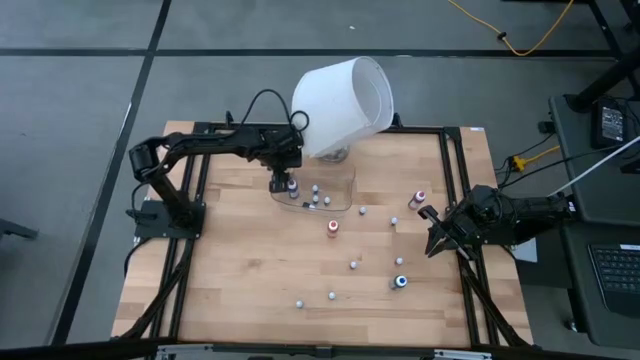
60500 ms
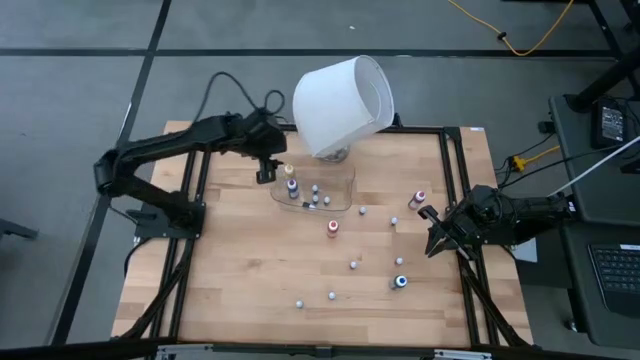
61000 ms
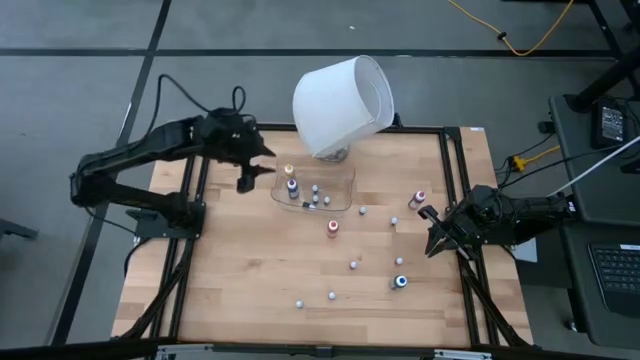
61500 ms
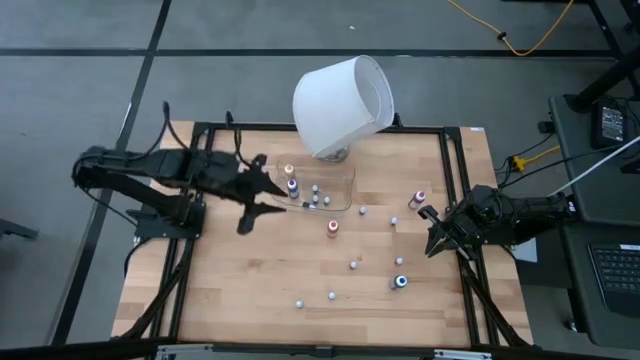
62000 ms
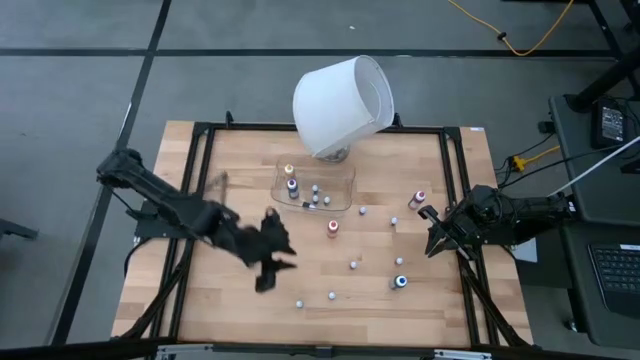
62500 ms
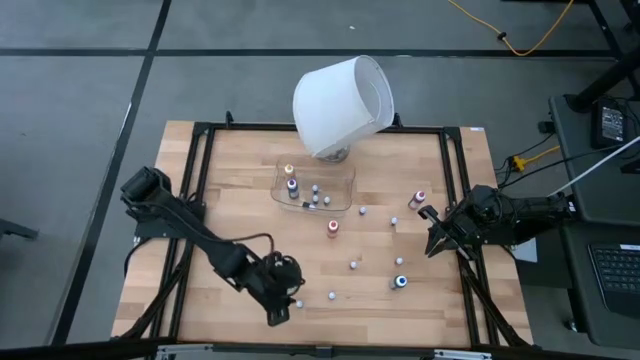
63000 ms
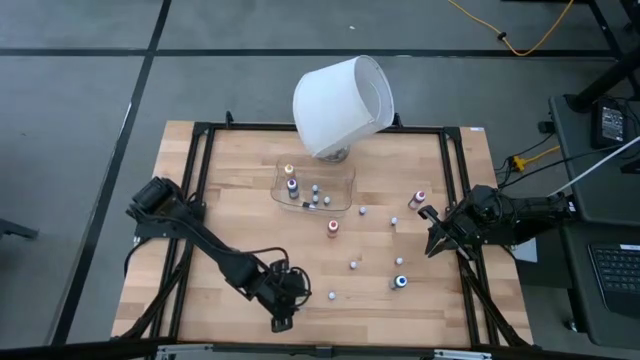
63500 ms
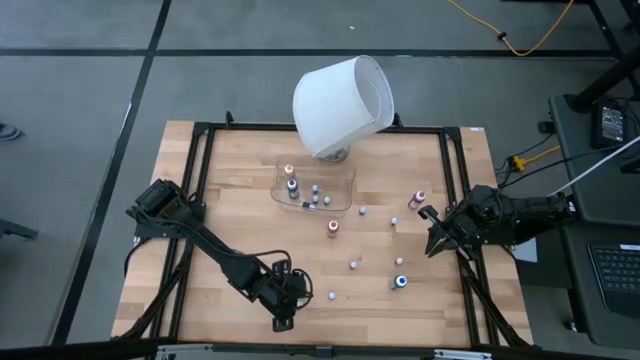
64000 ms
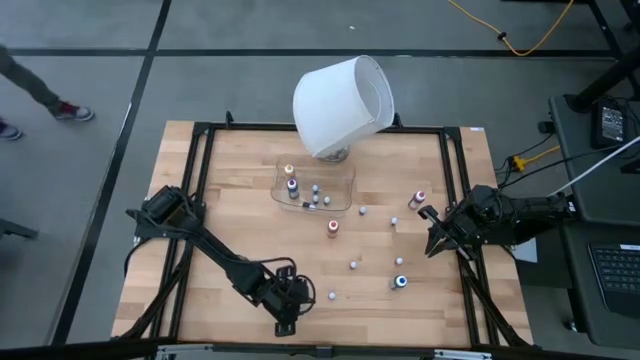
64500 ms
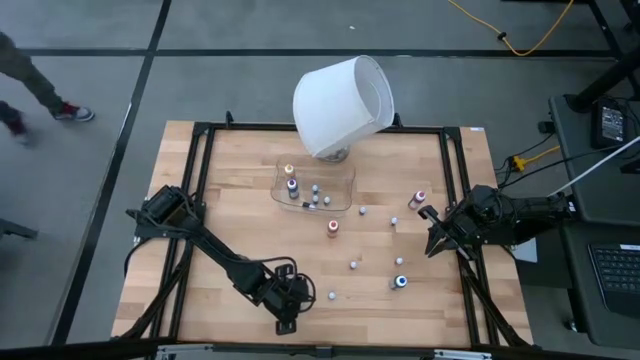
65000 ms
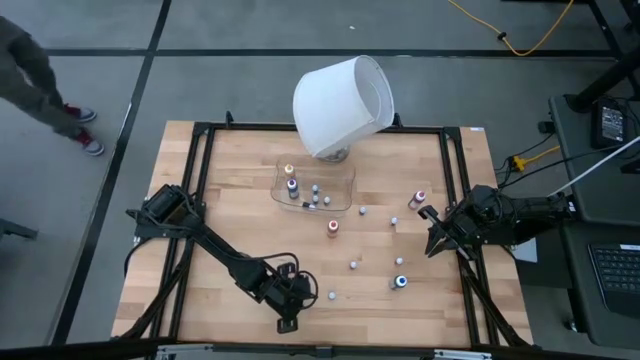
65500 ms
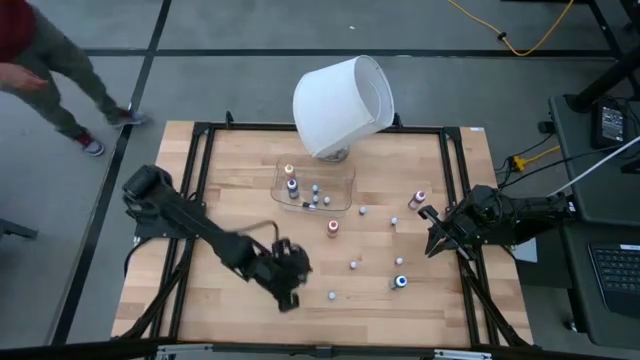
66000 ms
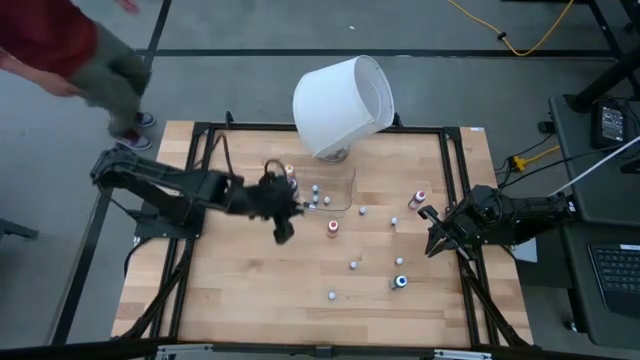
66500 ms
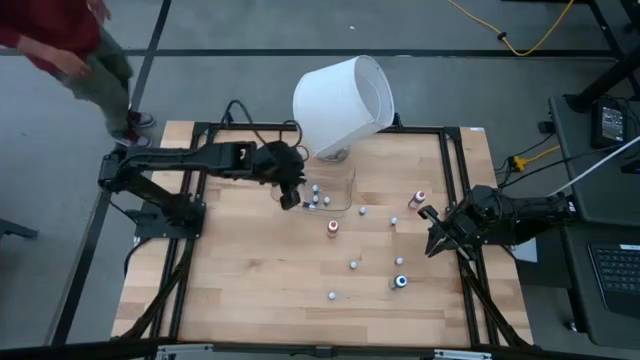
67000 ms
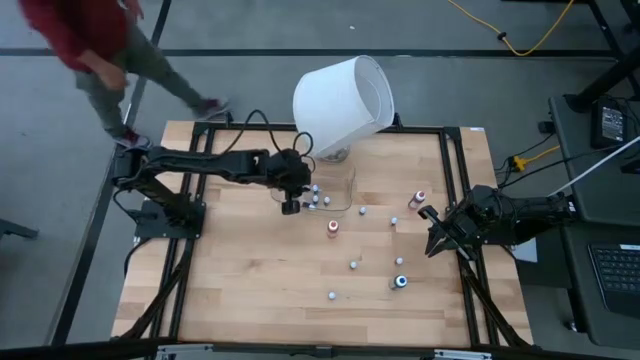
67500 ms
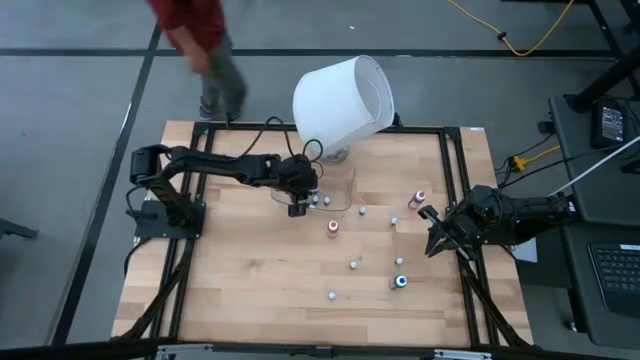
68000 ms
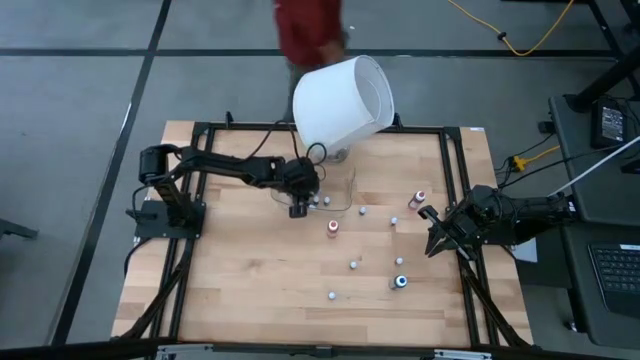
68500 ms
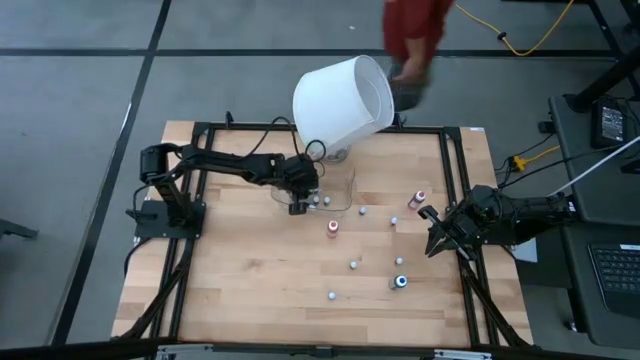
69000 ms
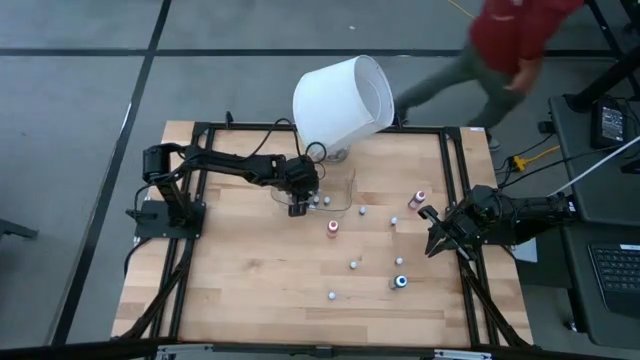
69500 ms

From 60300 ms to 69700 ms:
Task: Pick & Place food coloring
Put the small purple food coloring bottle into the container

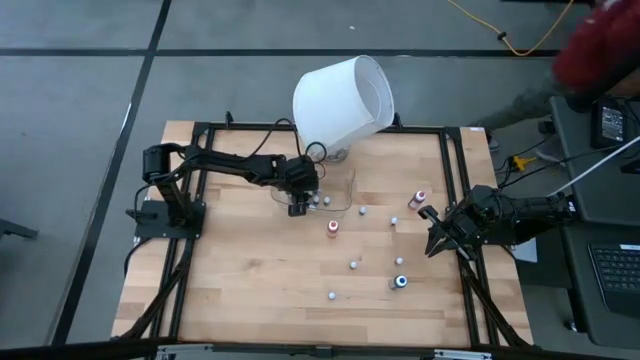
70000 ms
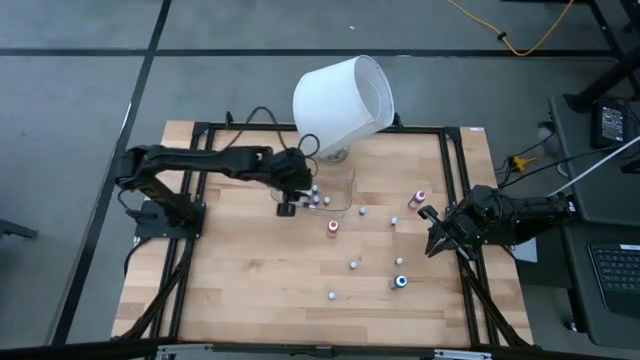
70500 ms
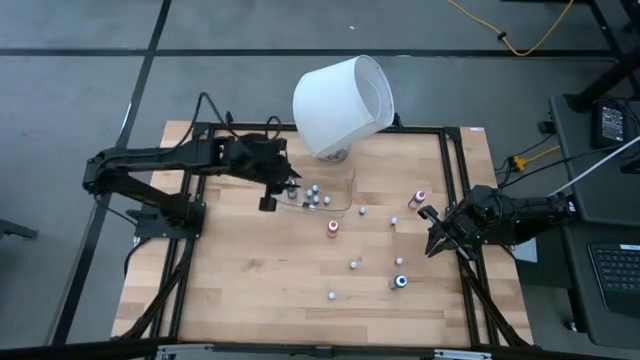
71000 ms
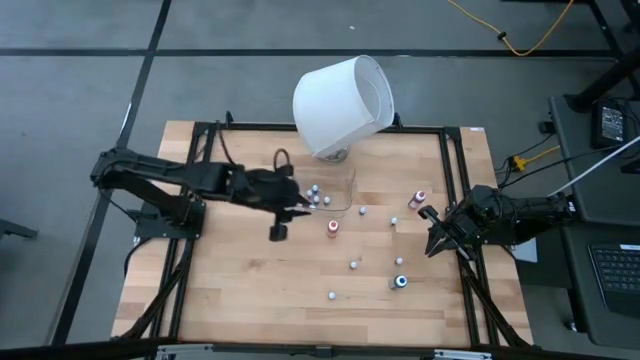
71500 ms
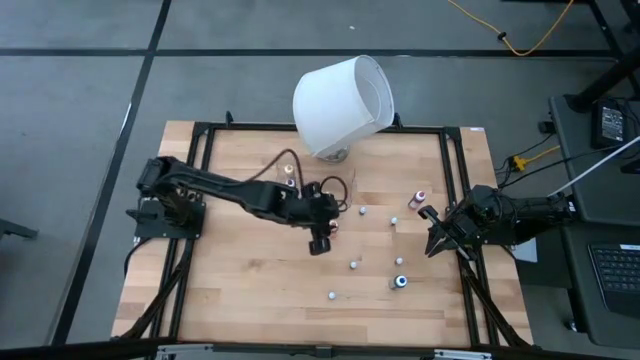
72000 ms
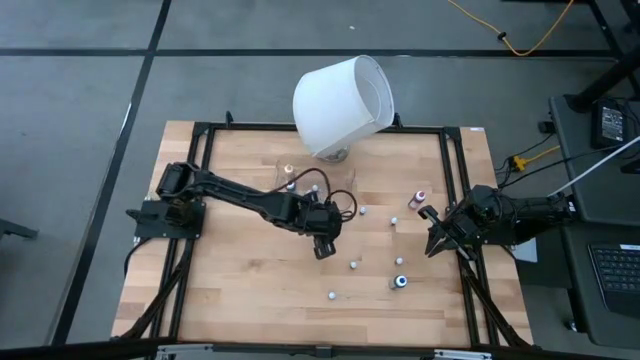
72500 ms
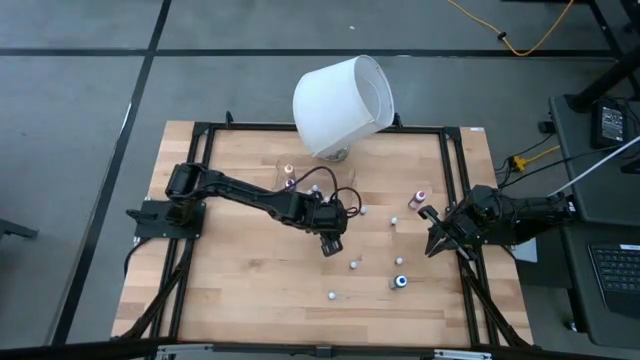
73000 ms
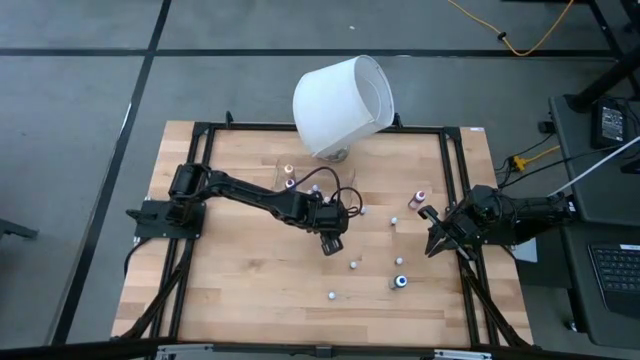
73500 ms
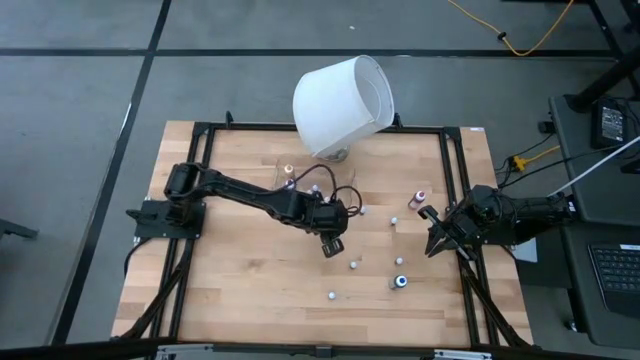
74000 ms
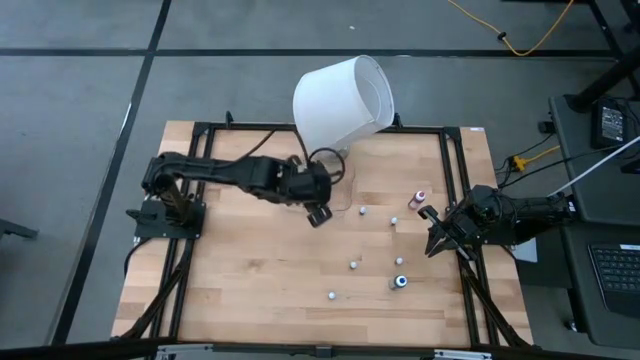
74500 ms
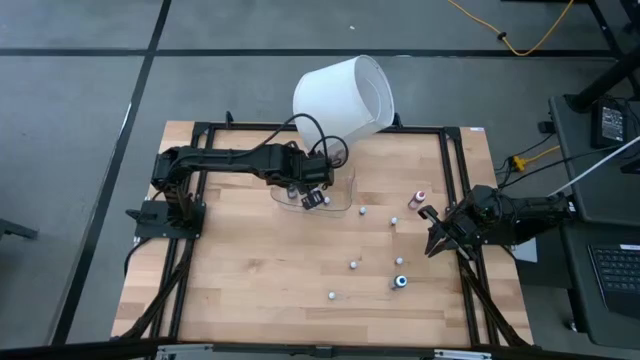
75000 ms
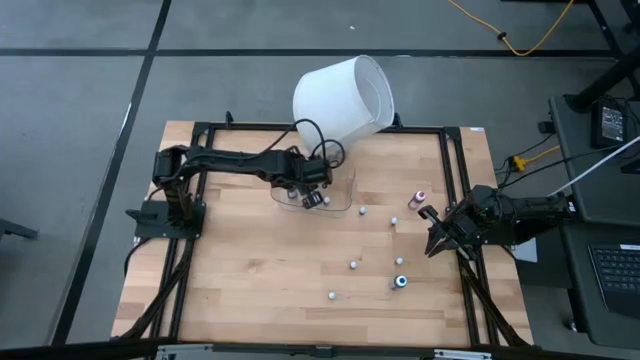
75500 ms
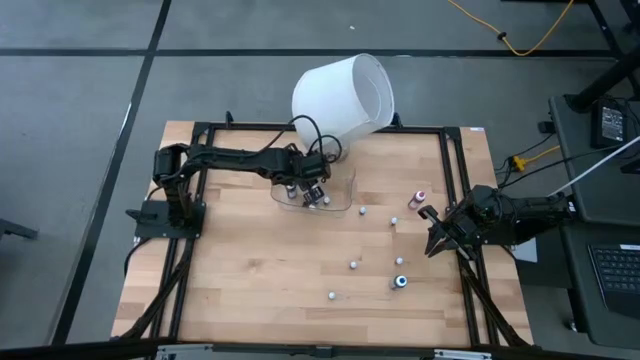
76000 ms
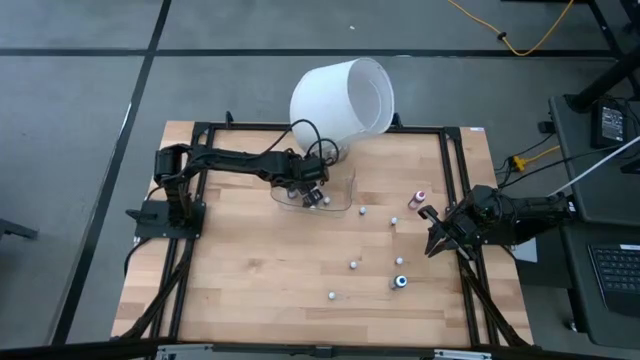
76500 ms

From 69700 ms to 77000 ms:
Put the big orange food coloring bottle into the container

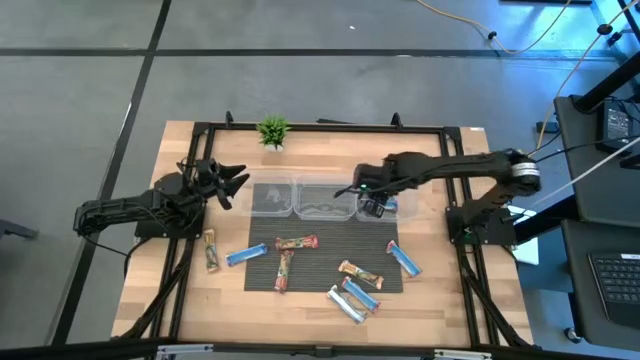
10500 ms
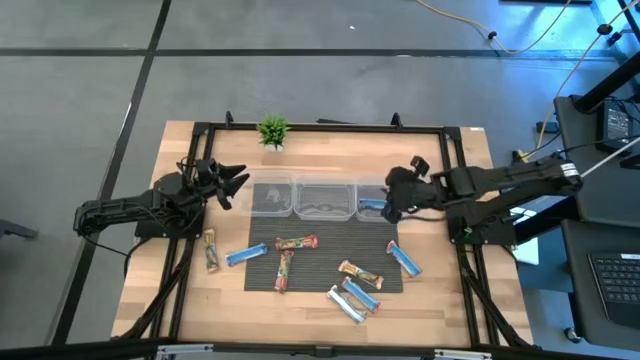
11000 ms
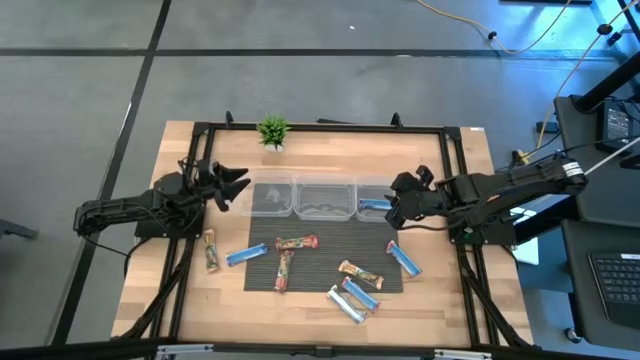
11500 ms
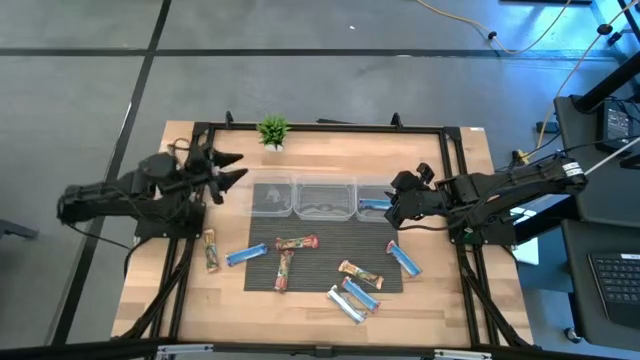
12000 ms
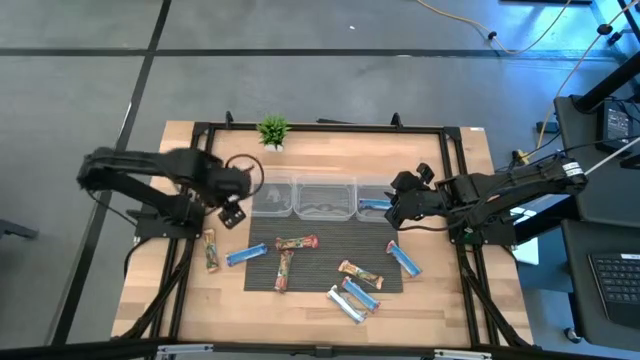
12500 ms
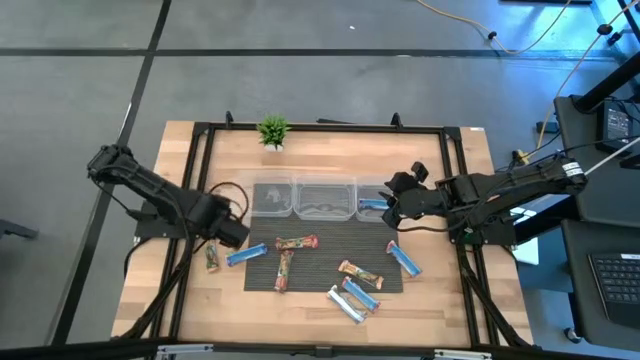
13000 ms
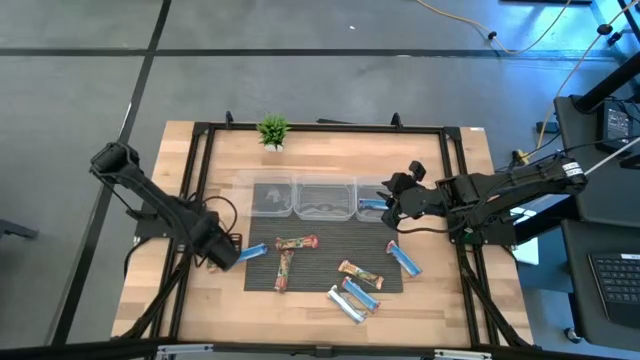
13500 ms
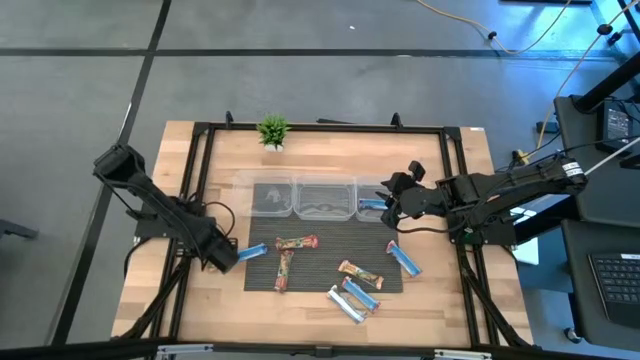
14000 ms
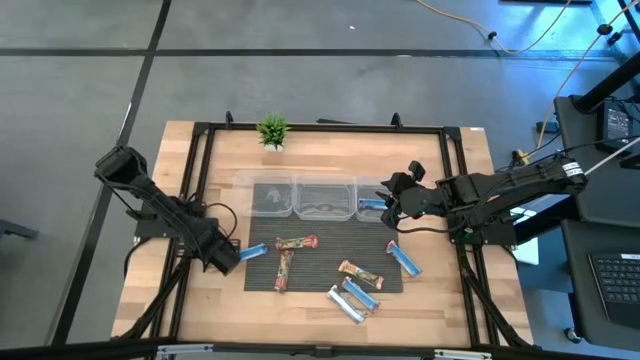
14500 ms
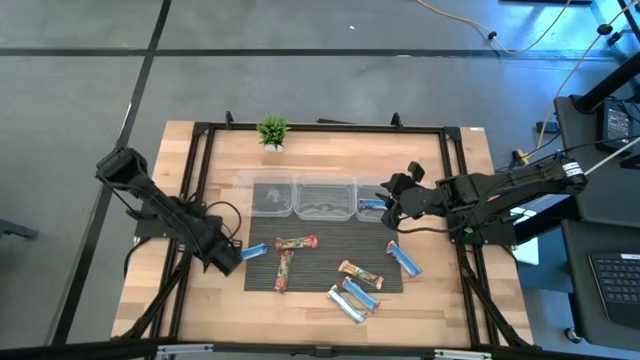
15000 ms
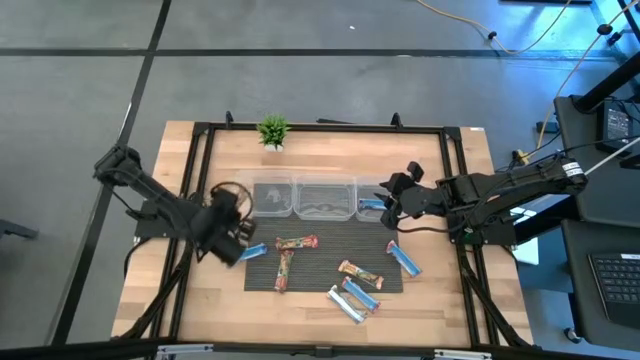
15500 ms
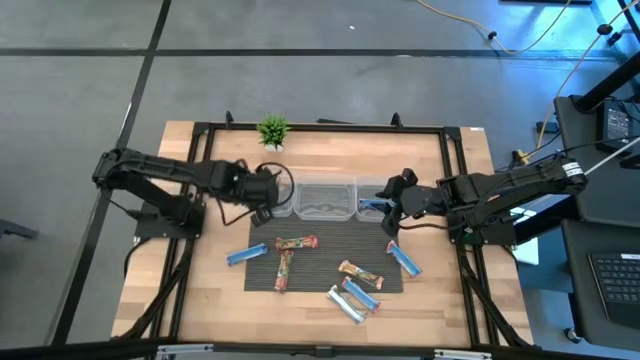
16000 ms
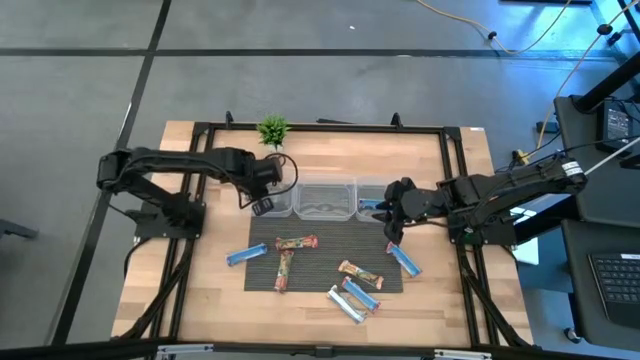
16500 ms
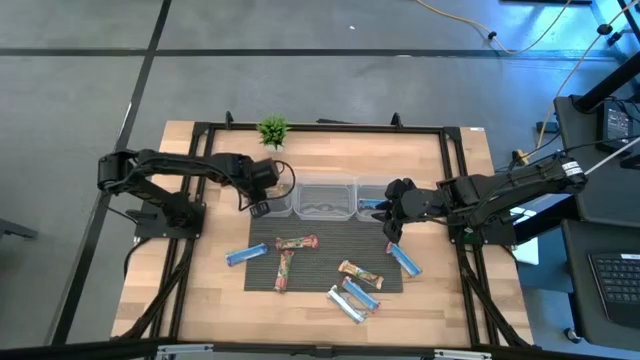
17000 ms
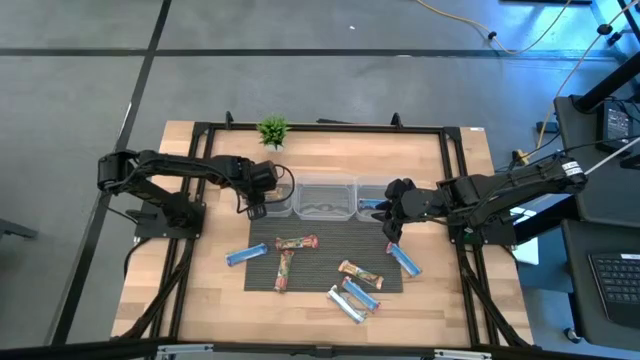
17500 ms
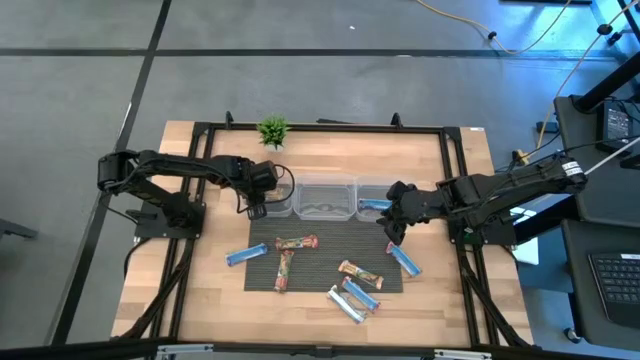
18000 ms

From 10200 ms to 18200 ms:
Task: Pick and place Granola Bars by type
Put the yellow granola bar into the left transparent bin
